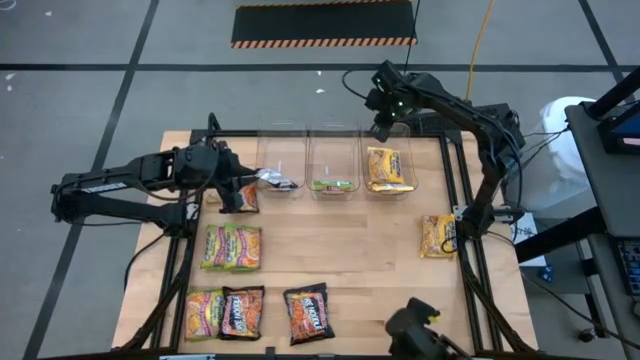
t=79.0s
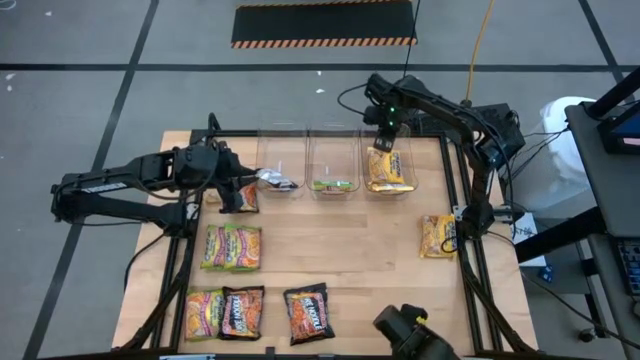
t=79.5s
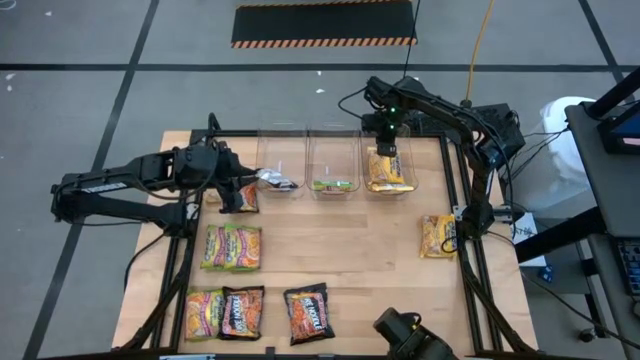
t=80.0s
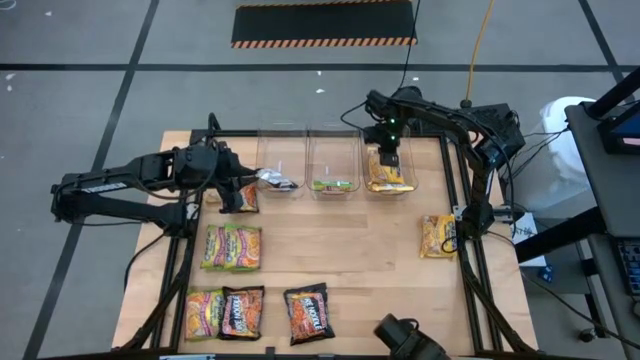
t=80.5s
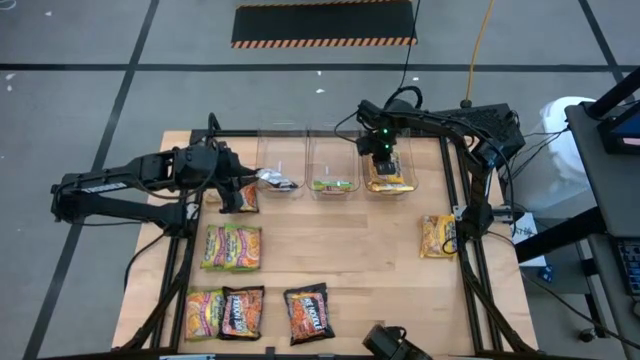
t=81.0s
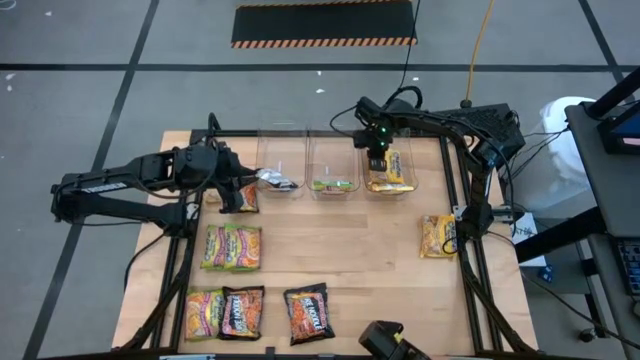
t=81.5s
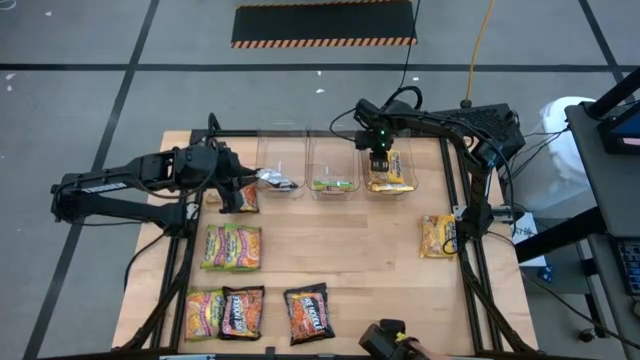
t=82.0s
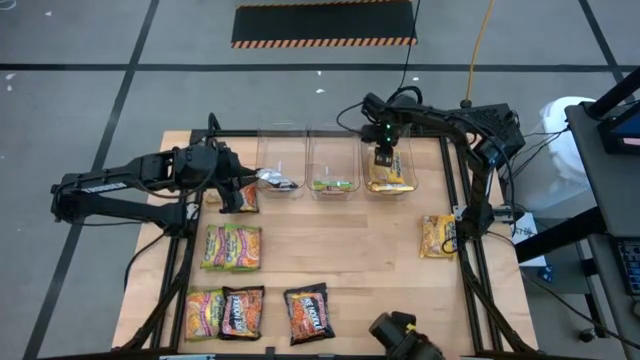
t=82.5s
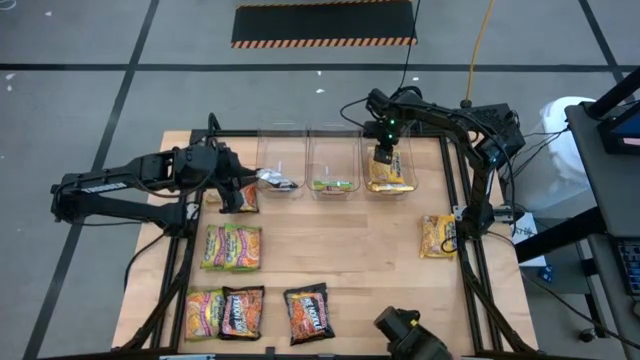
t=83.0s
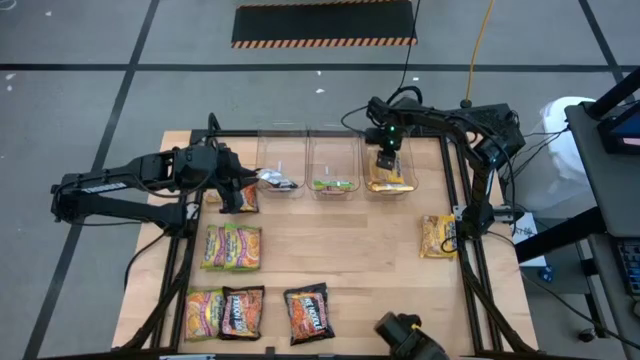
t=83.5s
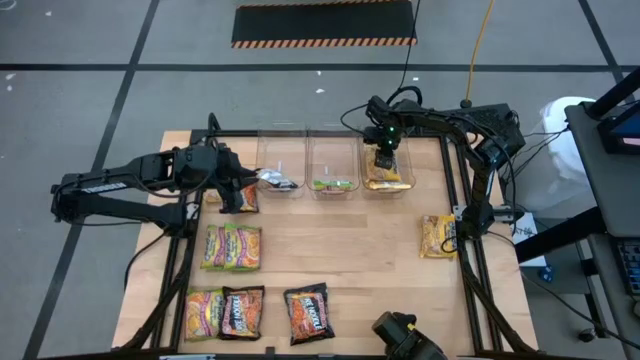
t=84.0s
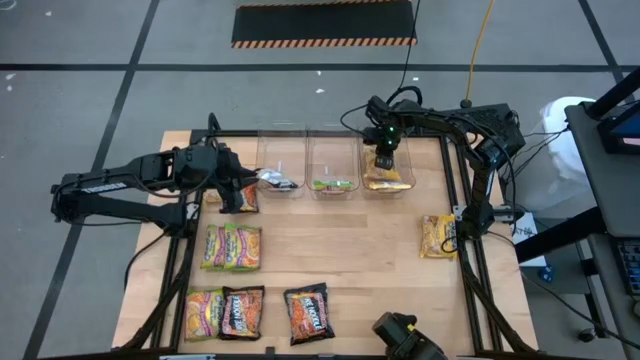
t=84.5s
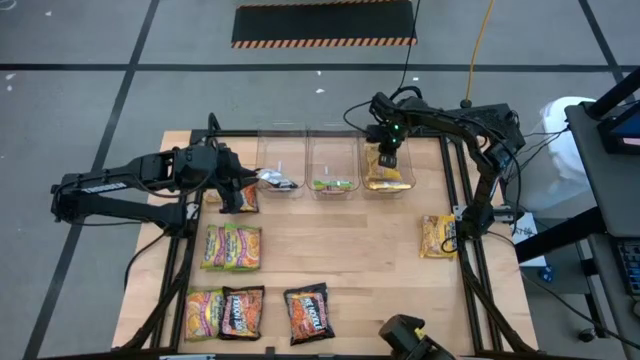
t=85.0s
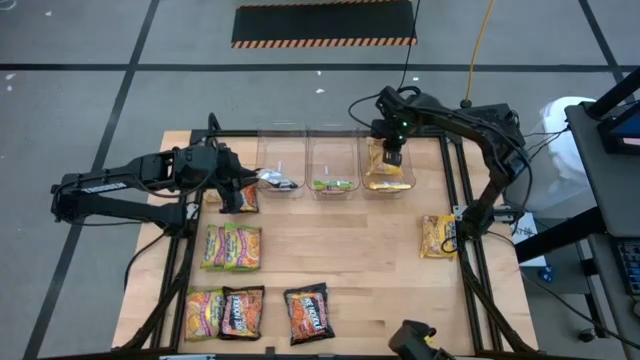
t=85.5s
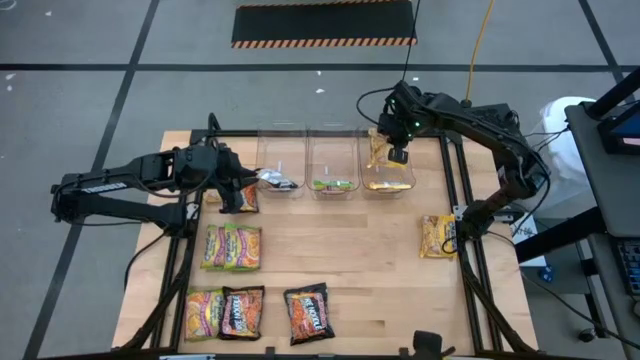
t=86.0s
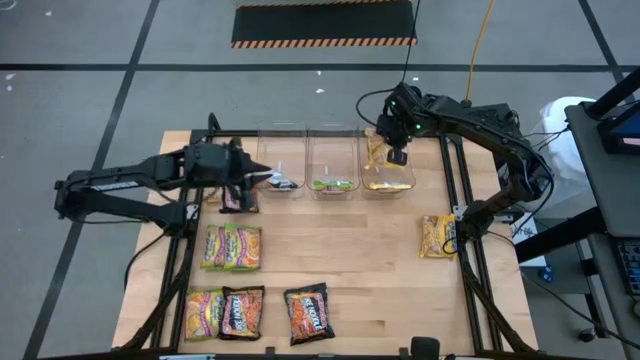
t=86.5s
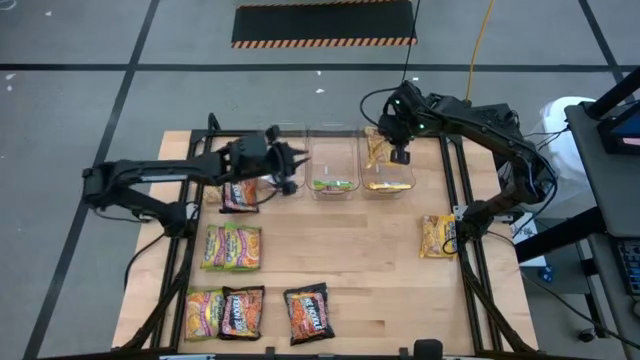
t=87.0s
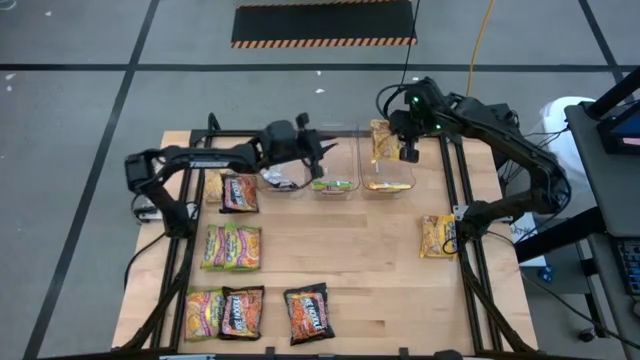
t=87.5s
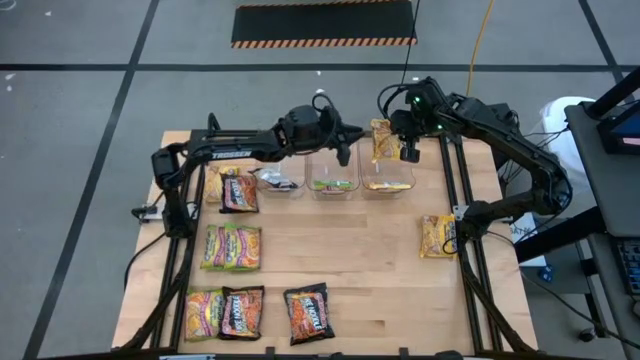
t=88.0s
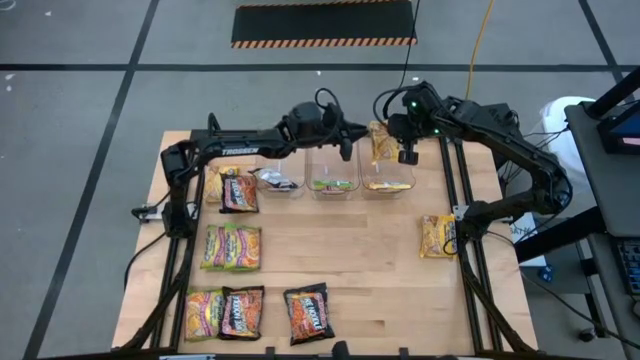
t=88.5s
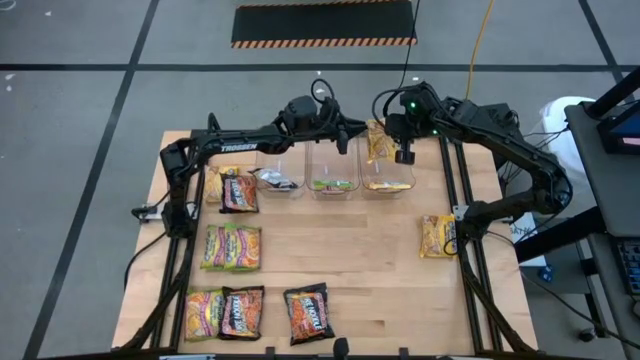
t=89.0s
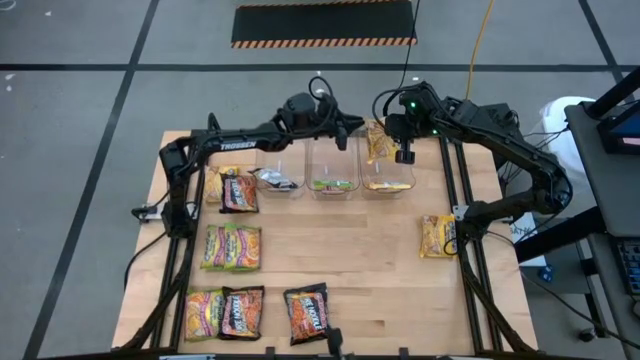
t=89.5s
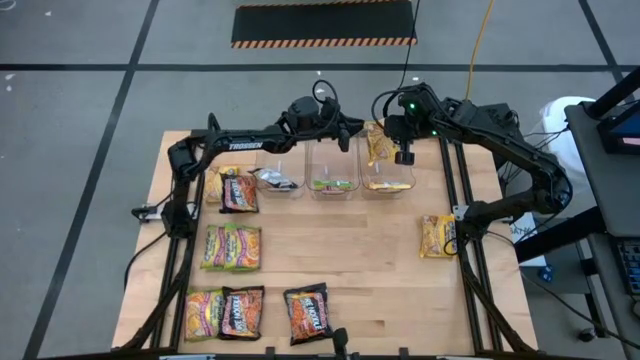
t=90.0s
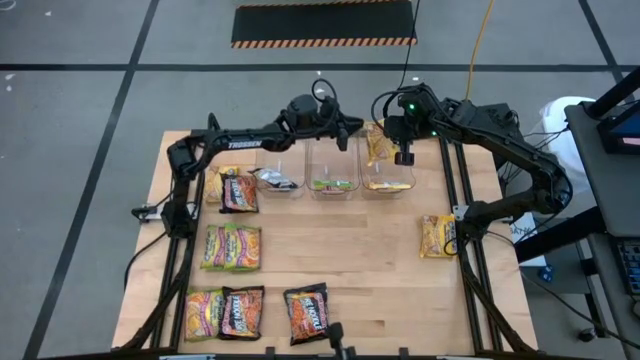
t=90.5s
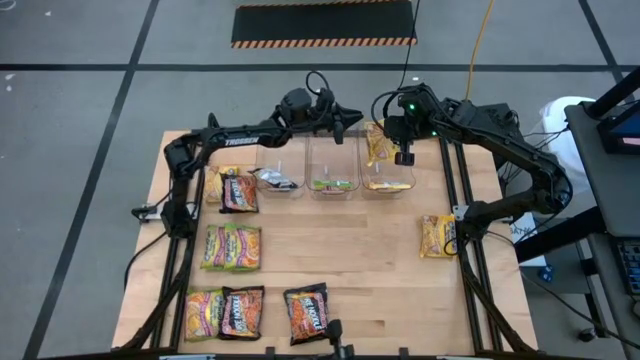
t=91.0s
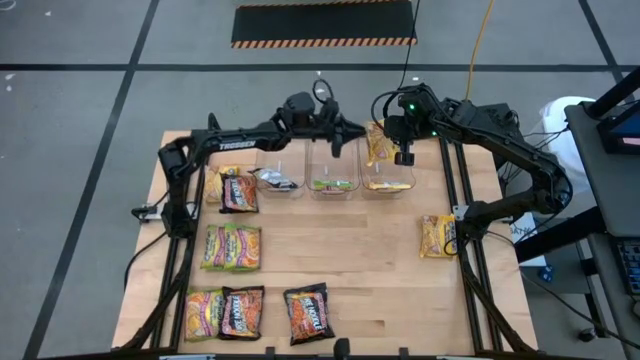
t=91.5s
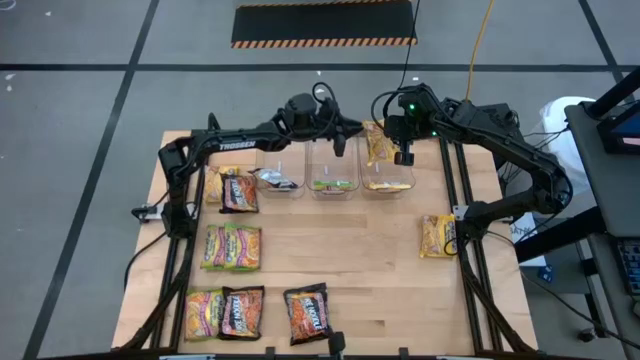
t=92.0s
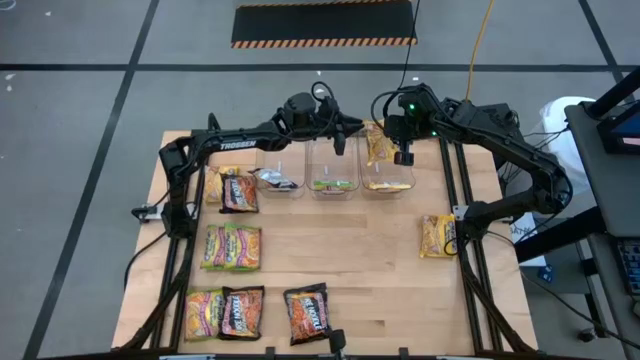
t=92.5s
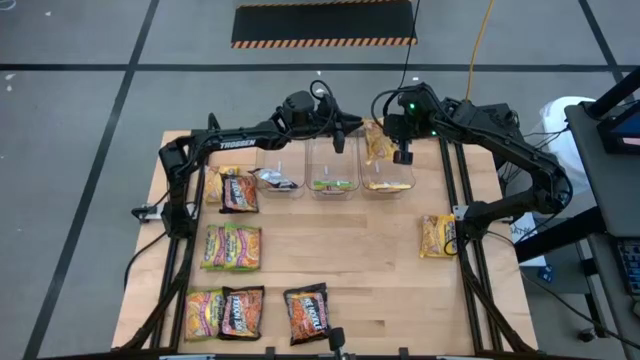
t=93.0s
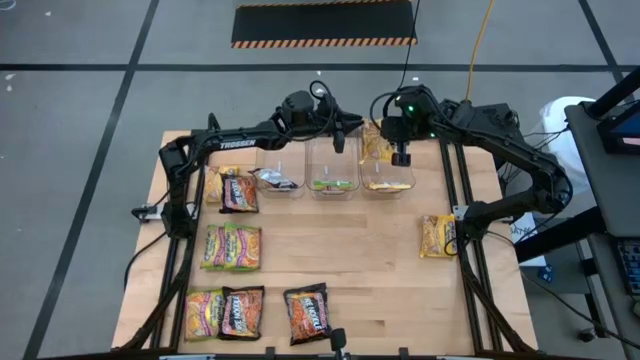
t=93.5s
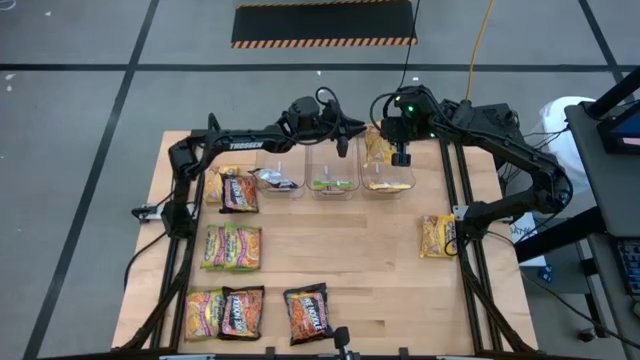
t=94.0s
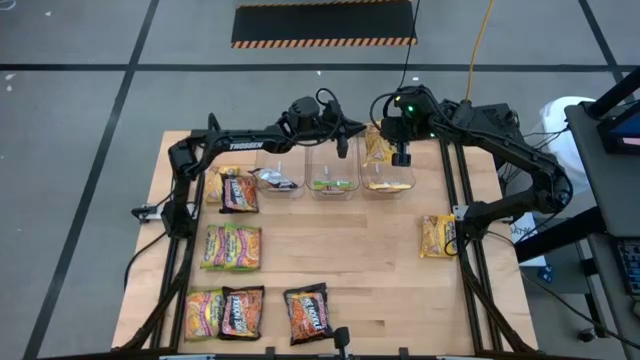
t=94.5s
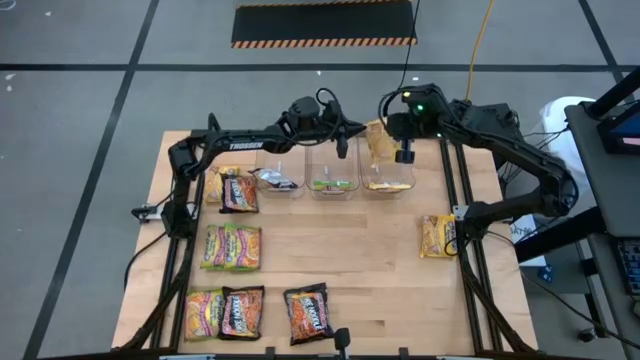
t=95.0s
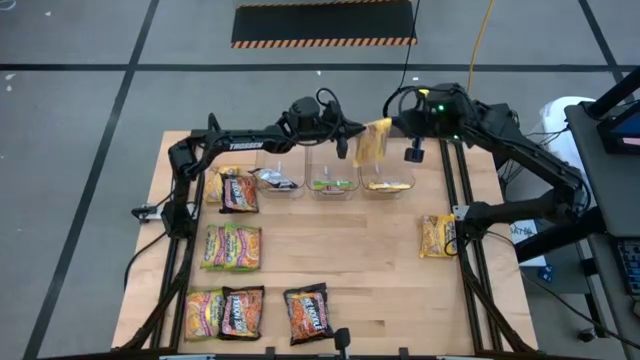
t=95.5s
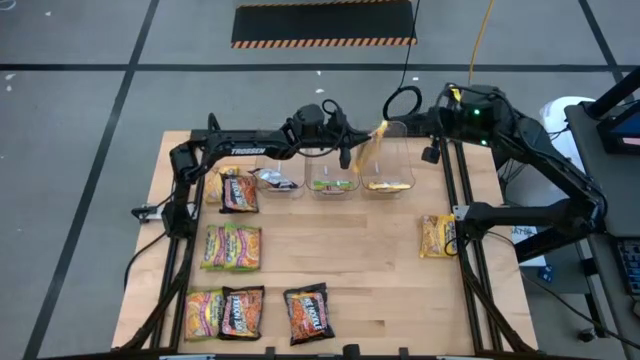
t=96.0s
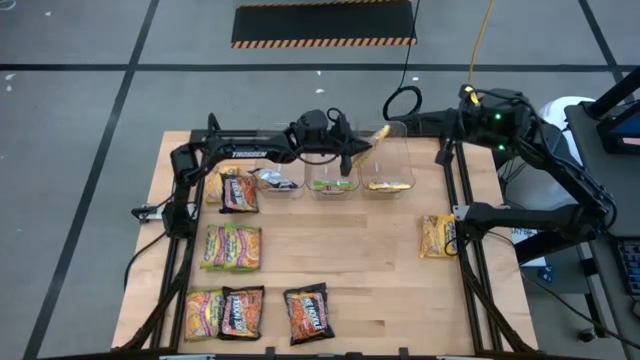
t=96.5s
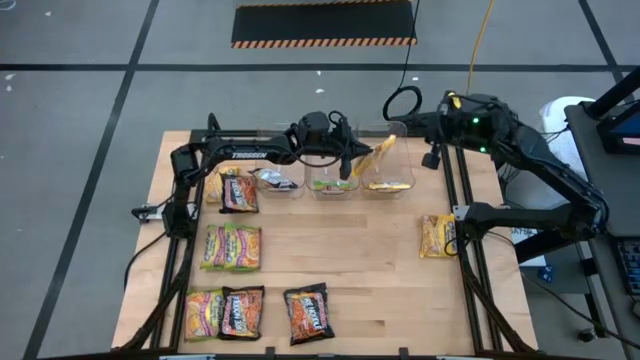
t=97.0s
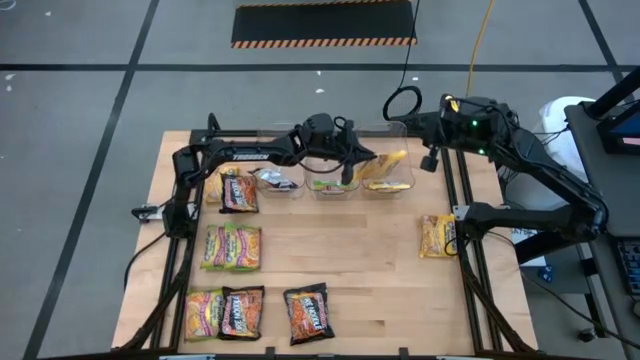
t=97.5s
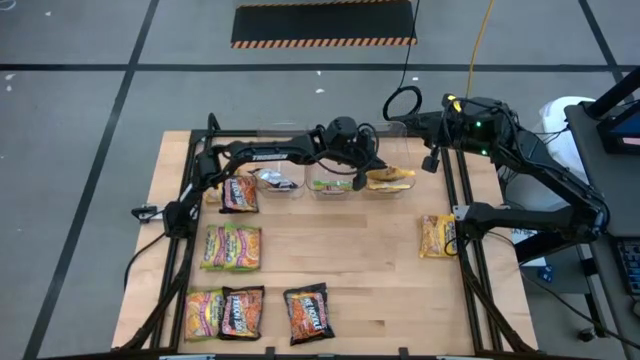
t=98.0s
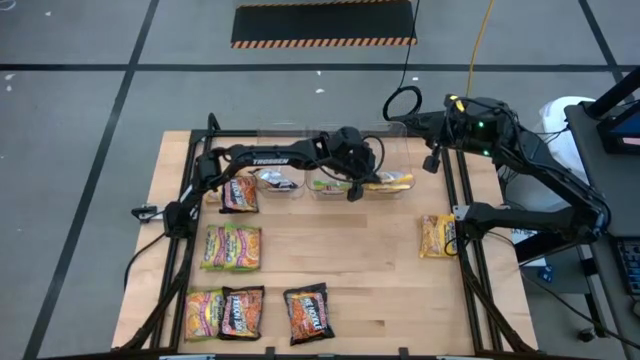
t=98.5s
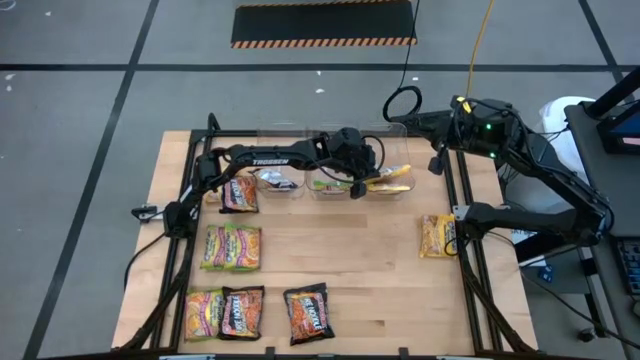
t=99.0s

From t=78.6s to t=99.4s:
Task: Sort Maruchan noodles
Put the yellow noodle pack into the right transparent bin
